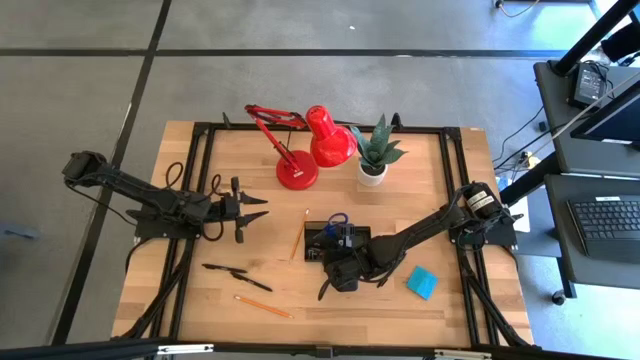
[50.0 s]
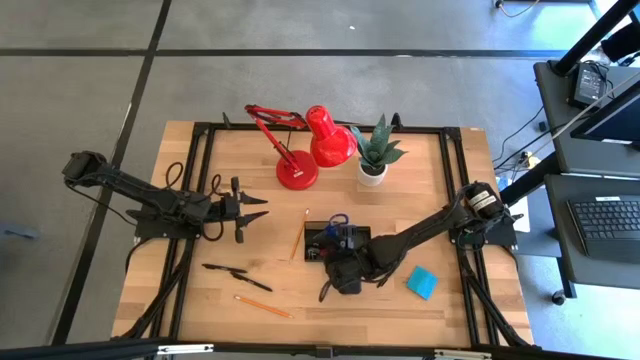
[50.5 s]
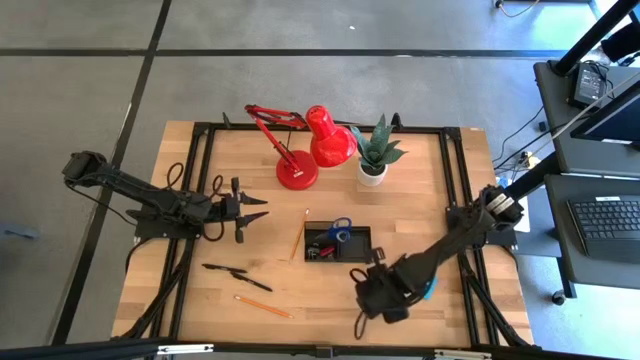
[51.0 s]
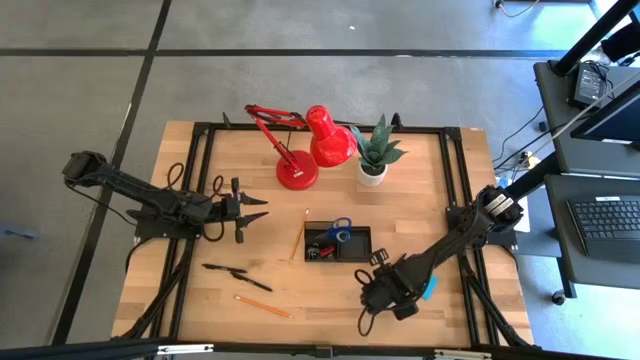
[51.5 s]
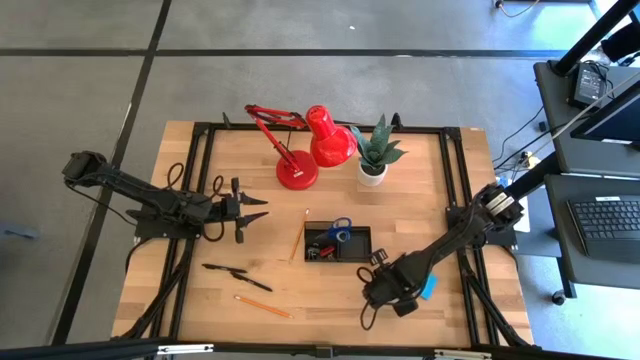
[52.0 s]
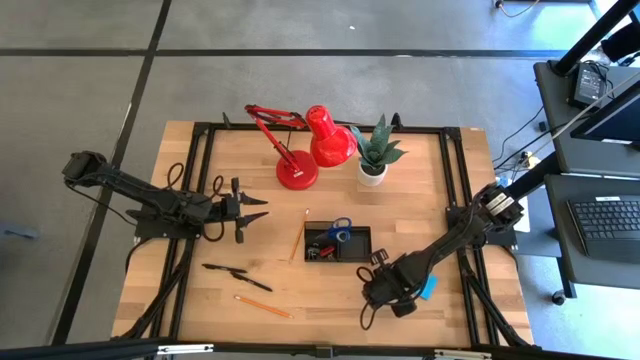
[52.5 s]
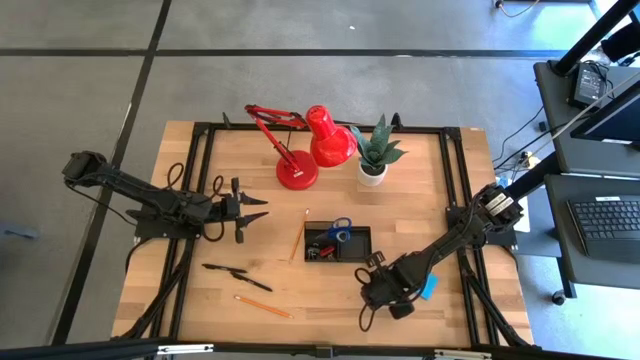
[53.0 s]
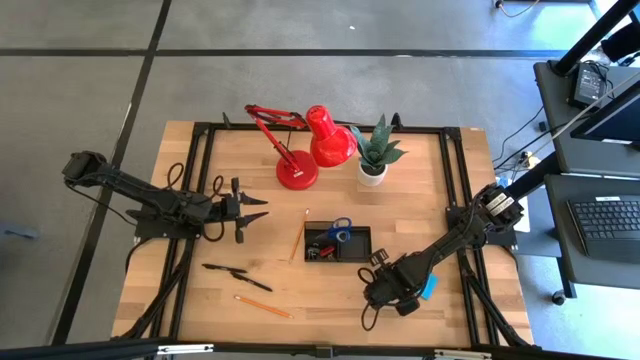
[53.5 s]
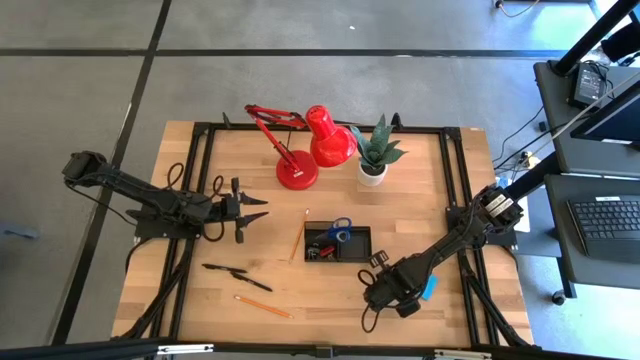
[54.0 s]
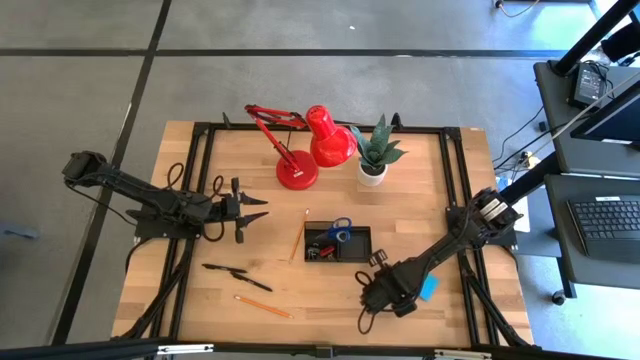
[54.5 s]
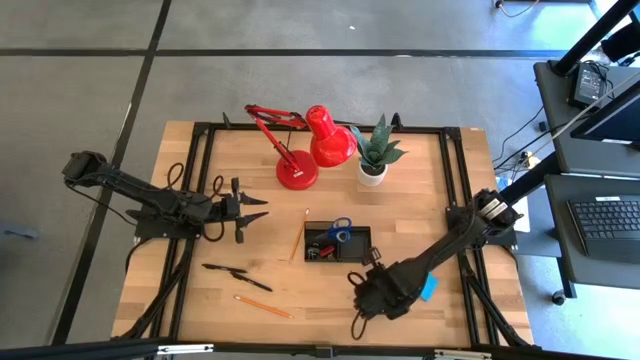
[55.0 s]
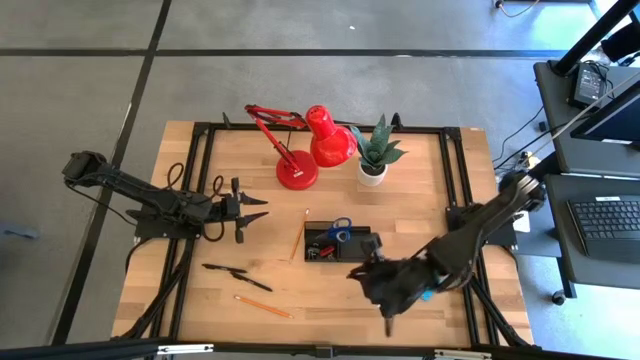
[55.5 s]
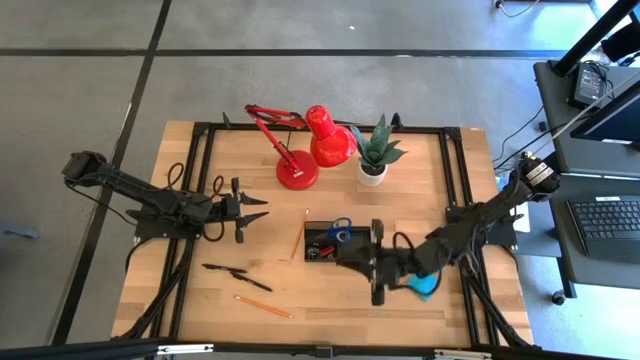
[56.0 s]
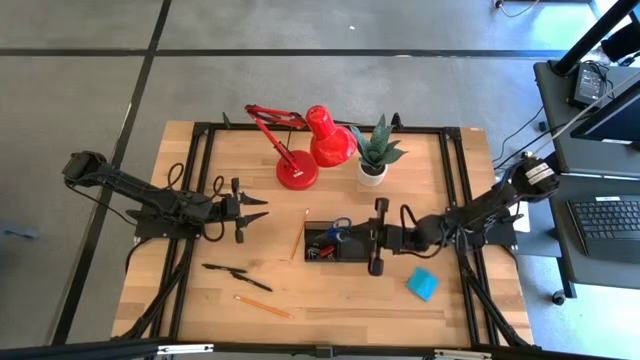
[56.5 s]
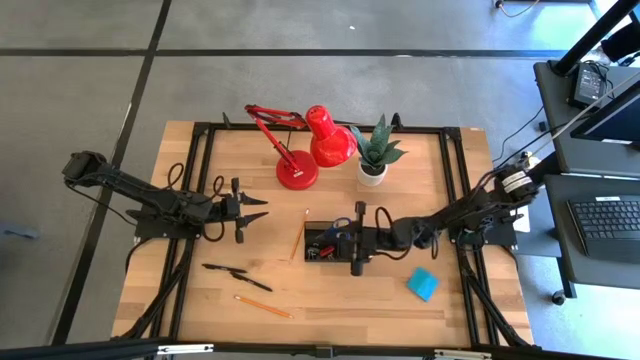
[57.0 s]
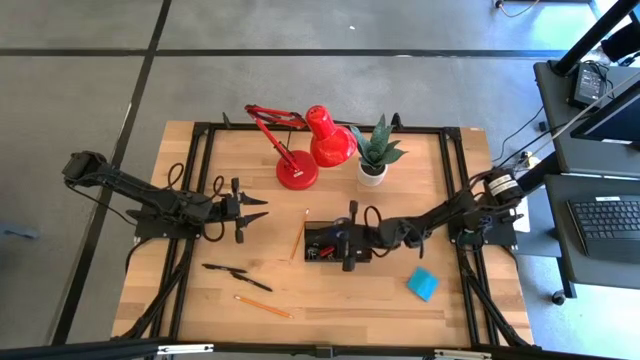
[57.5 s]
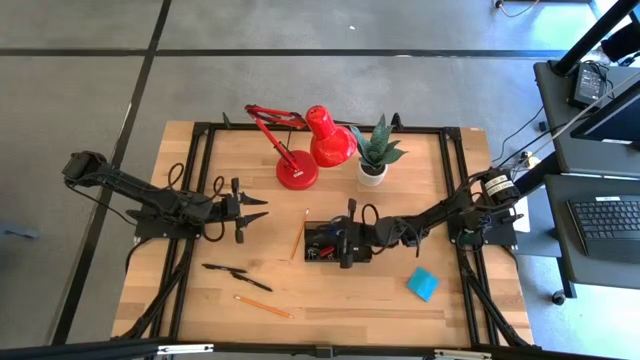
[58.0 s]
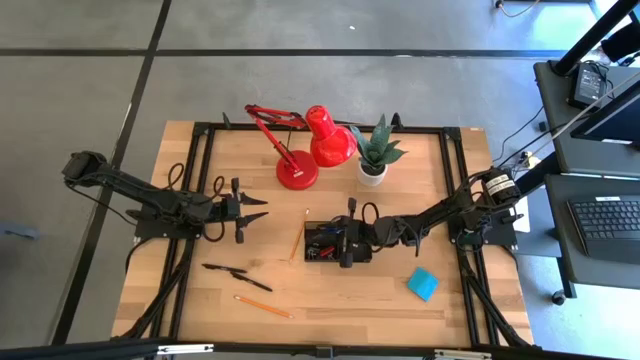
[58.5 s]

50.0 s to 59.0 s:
Task: Pick and place office supplies into organizer
Put the right black pen into the black desk organizer

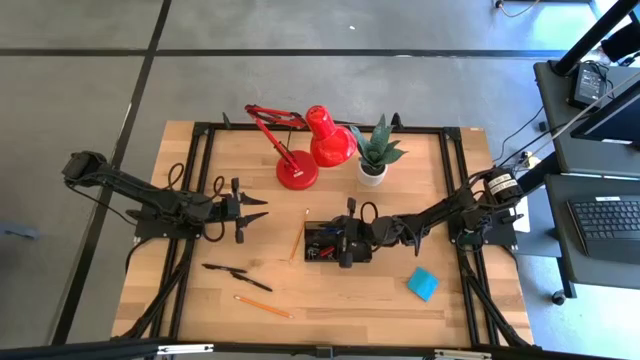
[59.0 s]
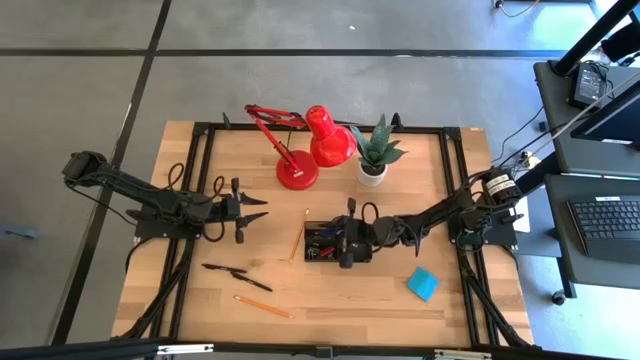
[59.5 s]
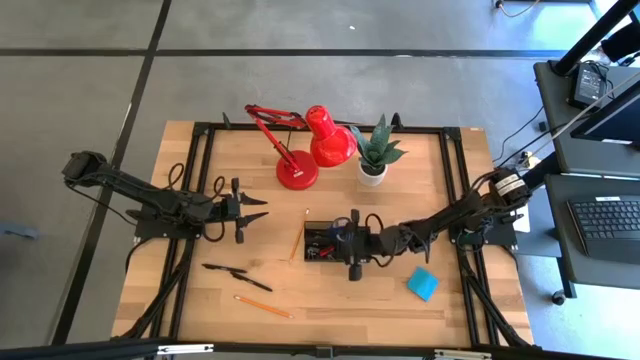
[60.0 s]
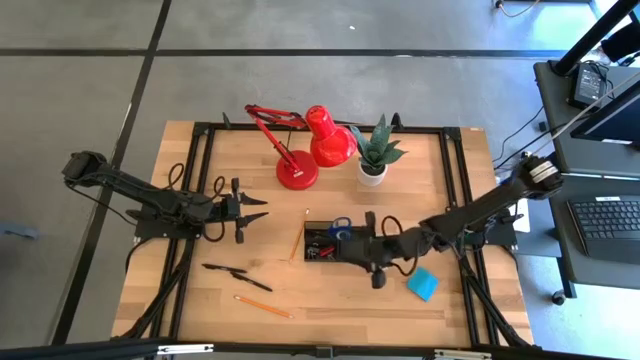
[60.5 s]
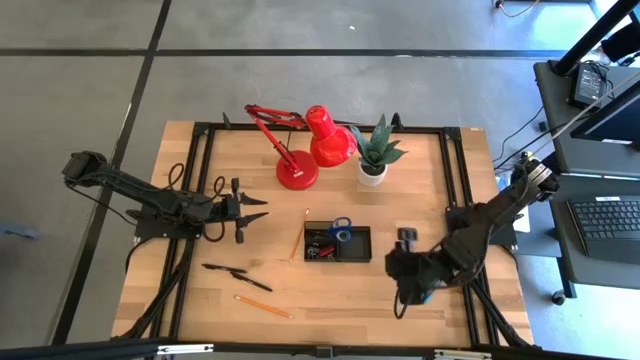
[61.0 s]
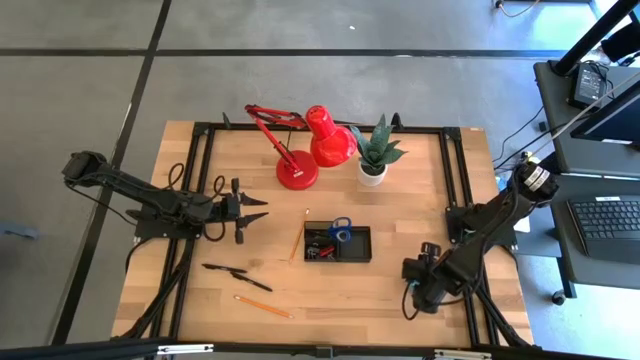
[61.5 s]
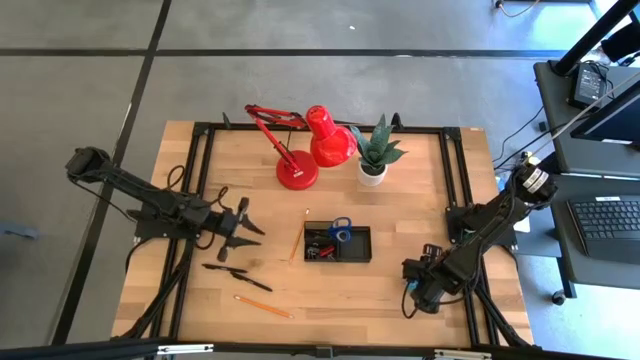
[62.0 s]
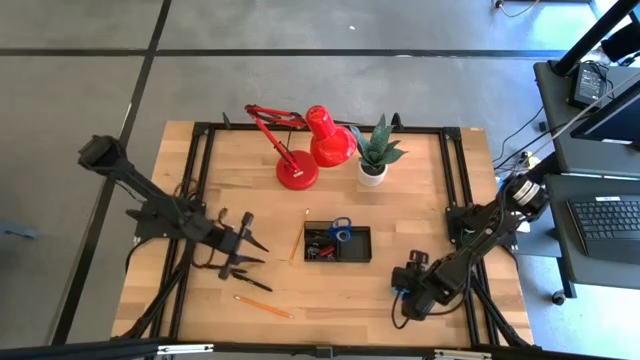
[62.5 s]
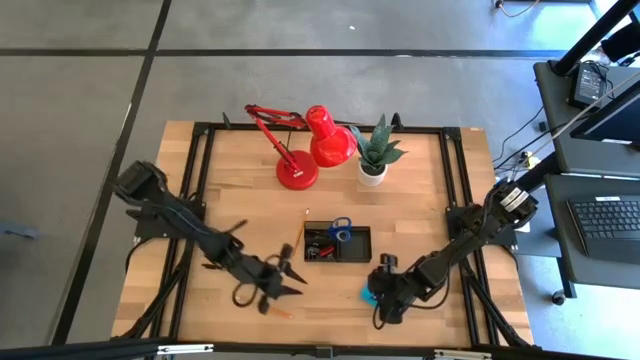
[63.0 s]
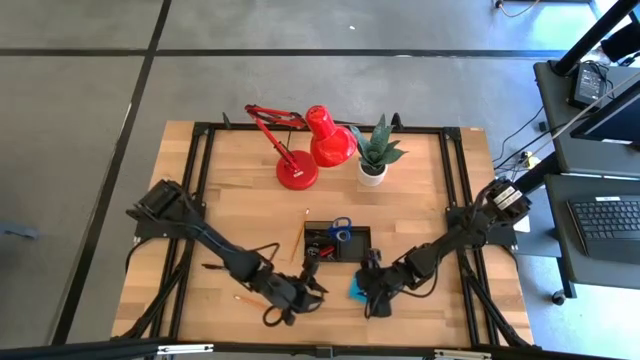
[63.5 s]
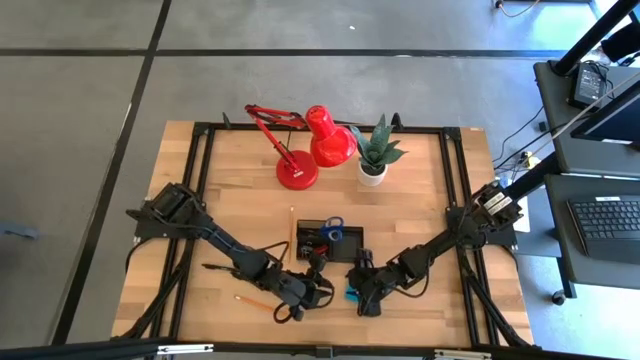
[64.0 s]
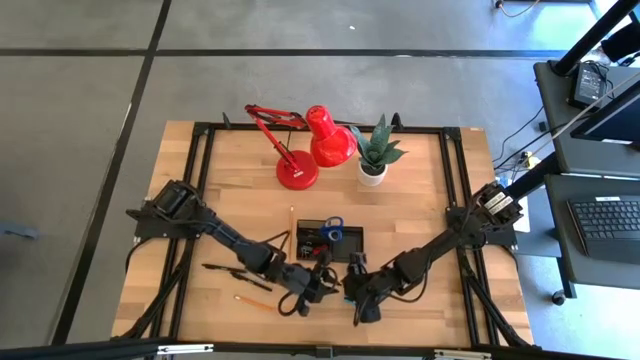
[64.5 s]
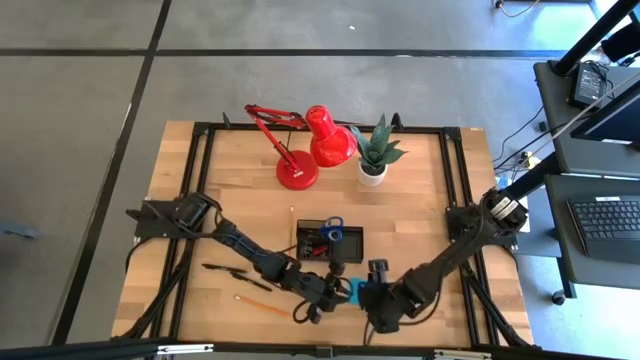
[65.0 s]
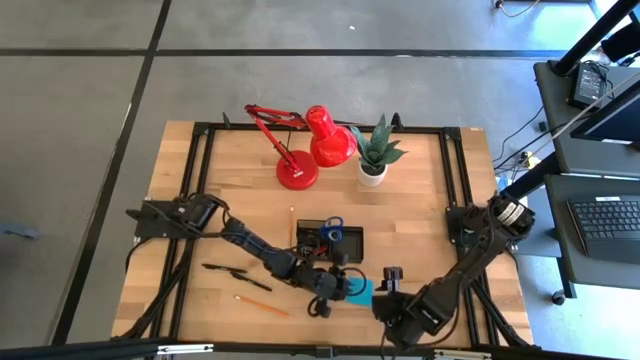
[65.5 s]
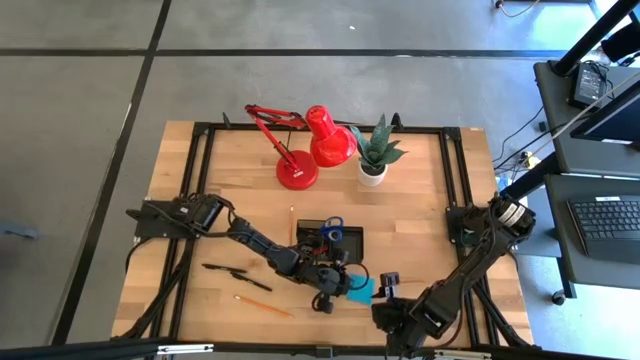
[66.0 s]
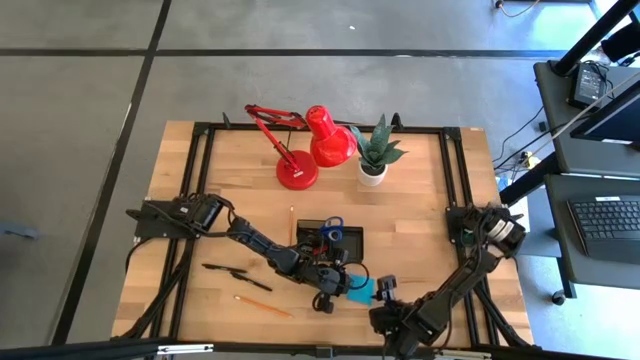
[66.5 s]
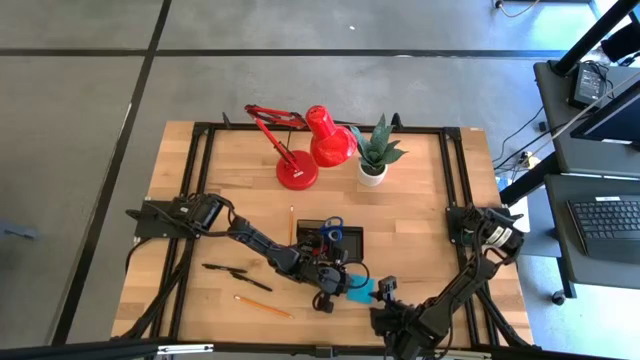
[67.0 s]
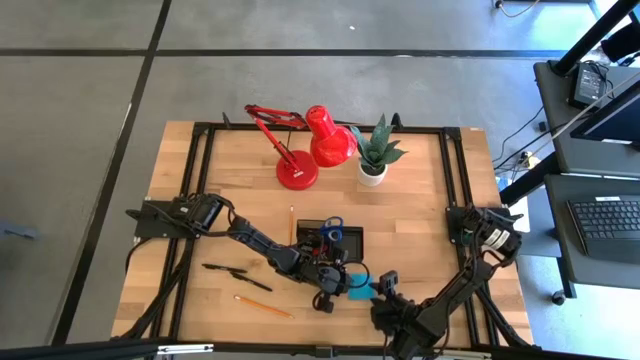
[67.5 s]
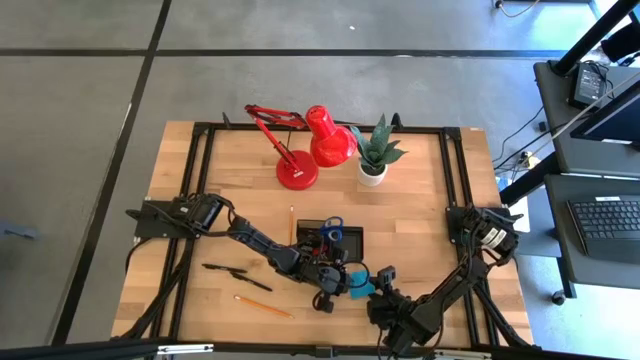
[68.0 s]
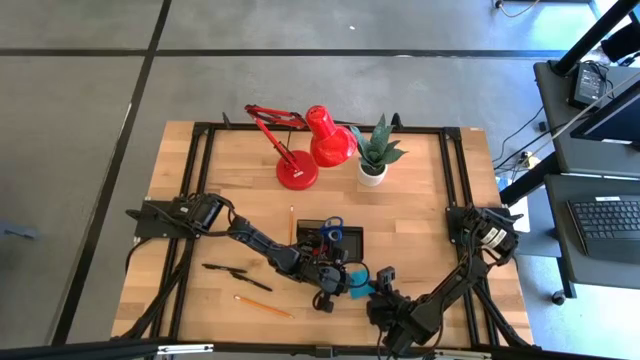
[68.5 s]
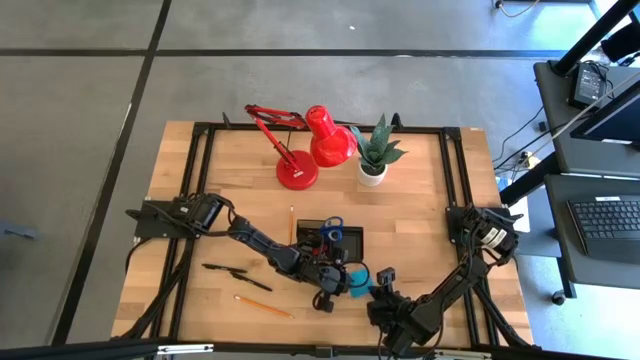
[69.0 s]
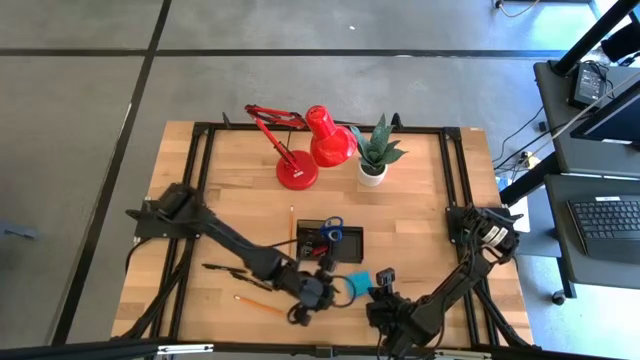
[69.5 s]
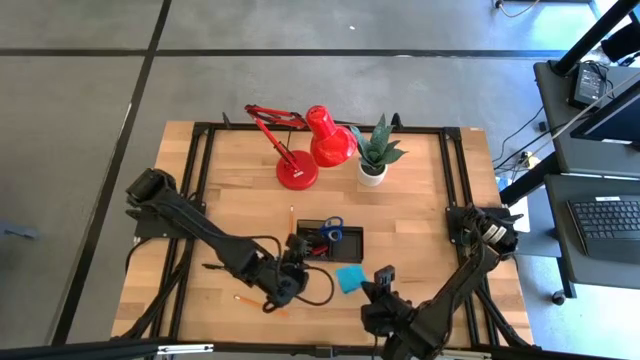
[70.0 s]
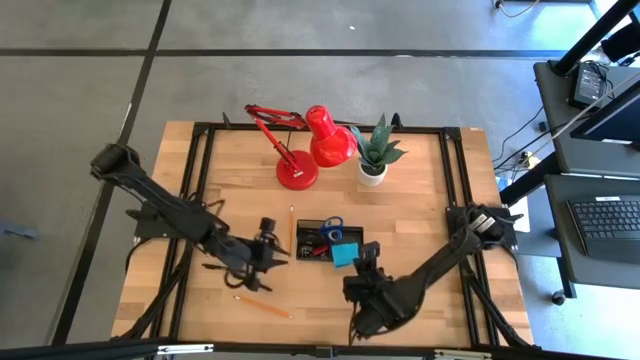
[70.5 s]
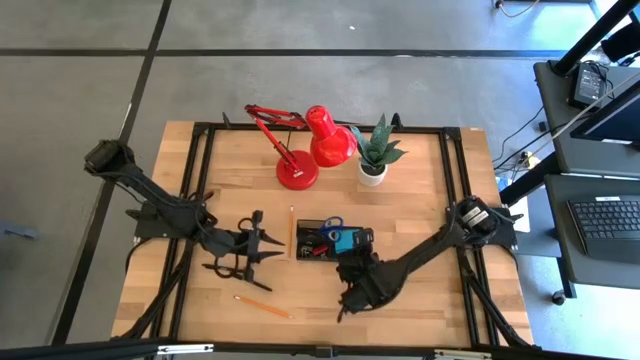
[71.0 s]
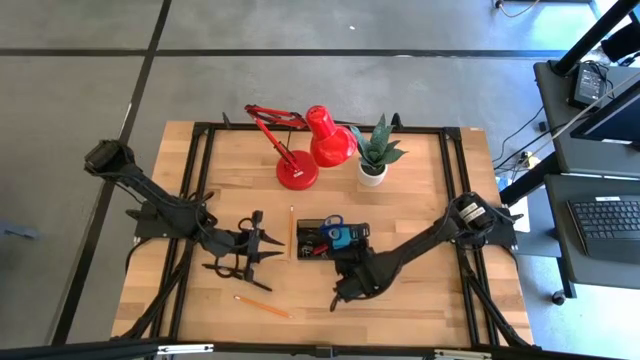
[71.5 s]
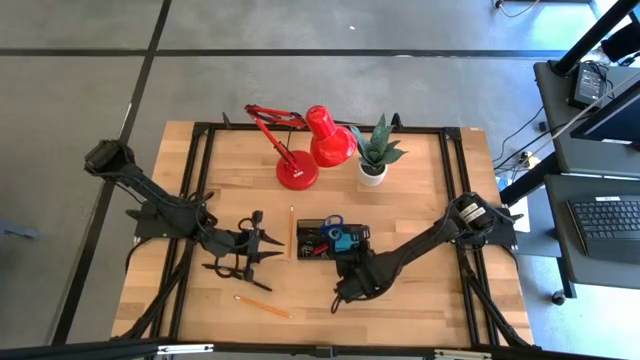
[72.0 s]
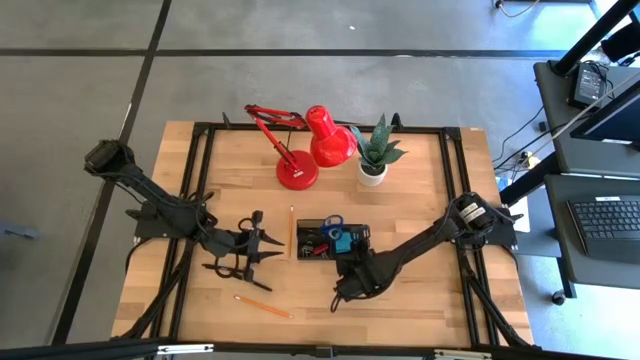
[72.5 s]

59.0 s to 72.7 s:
Put the sticky notes into the black desk organizer
